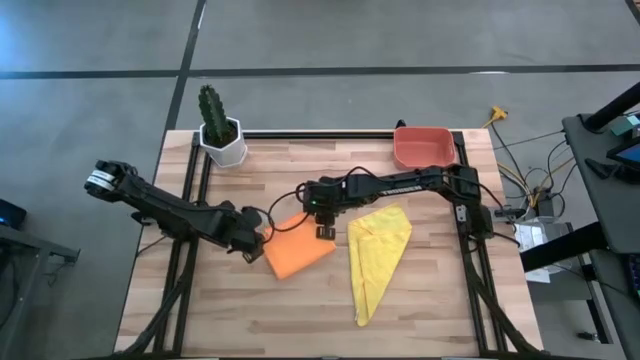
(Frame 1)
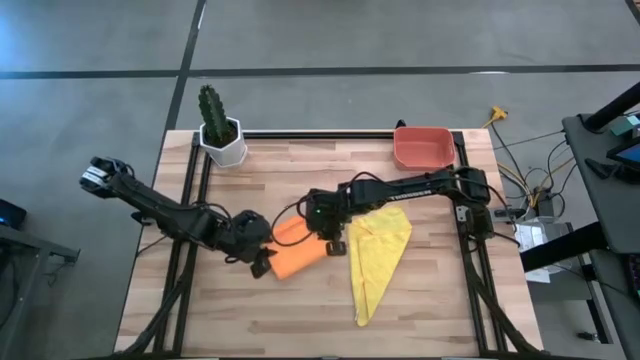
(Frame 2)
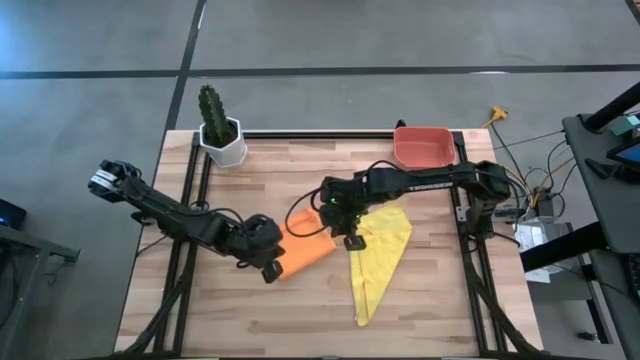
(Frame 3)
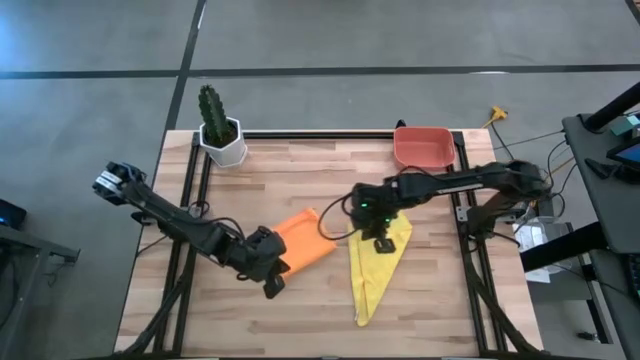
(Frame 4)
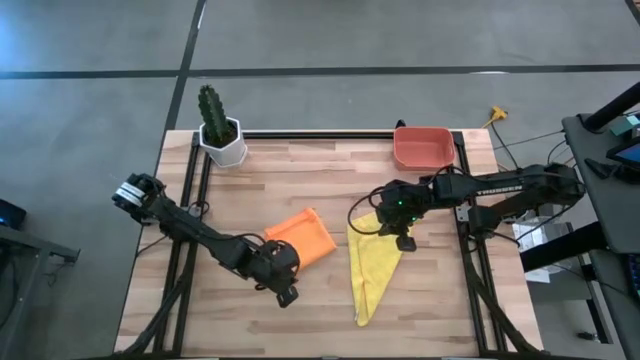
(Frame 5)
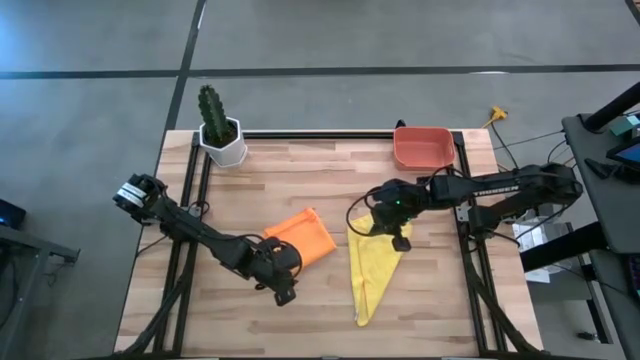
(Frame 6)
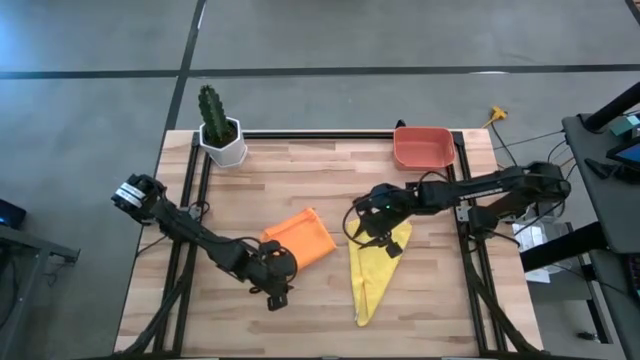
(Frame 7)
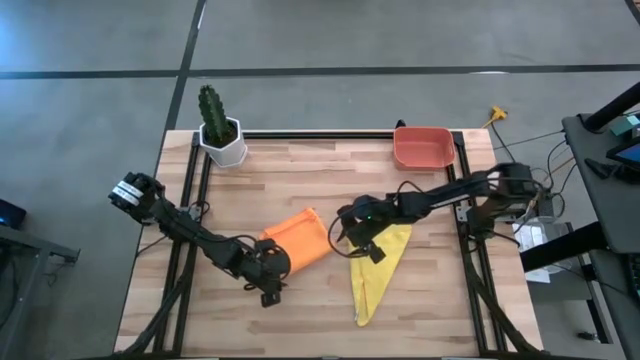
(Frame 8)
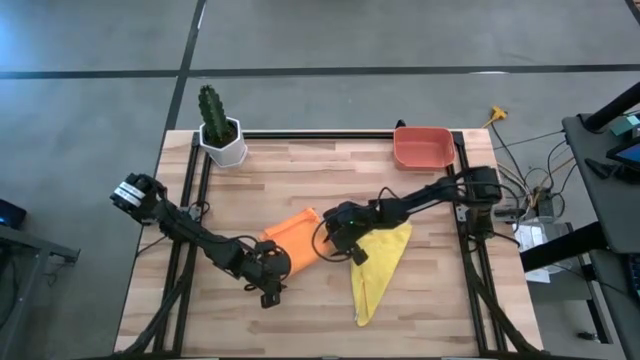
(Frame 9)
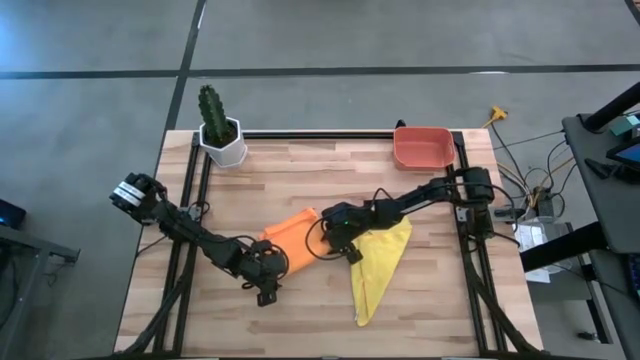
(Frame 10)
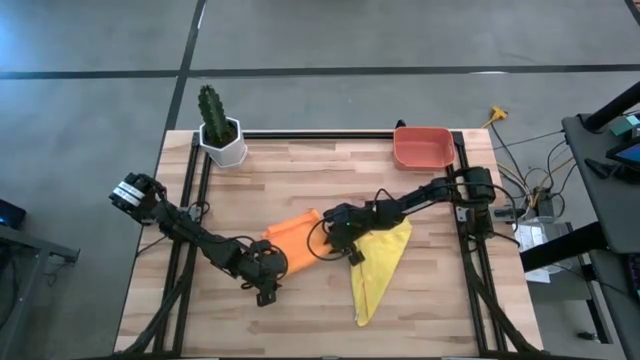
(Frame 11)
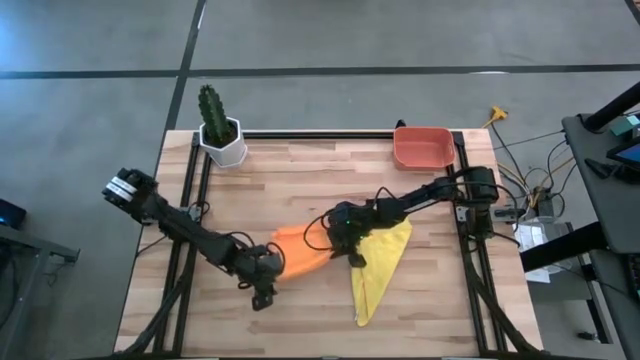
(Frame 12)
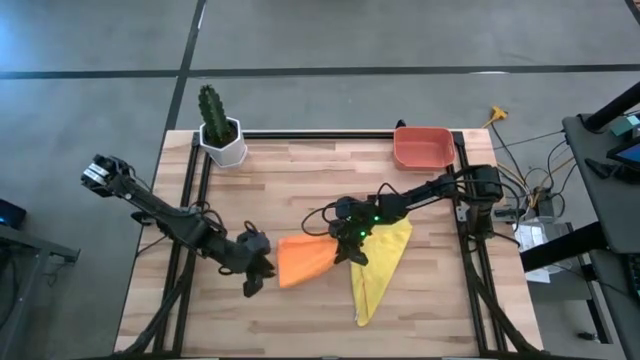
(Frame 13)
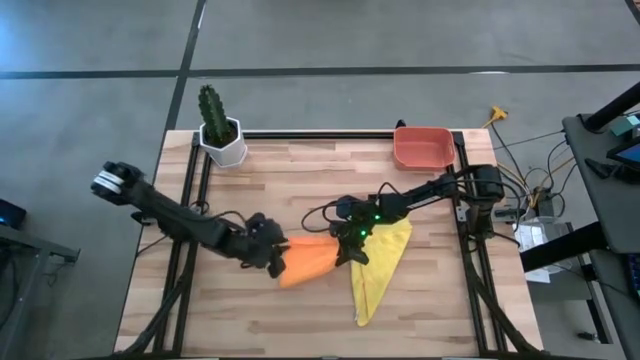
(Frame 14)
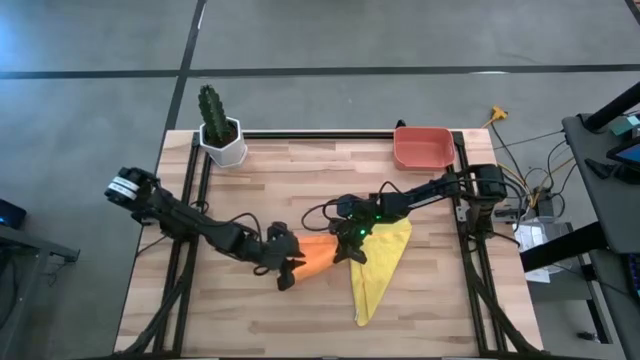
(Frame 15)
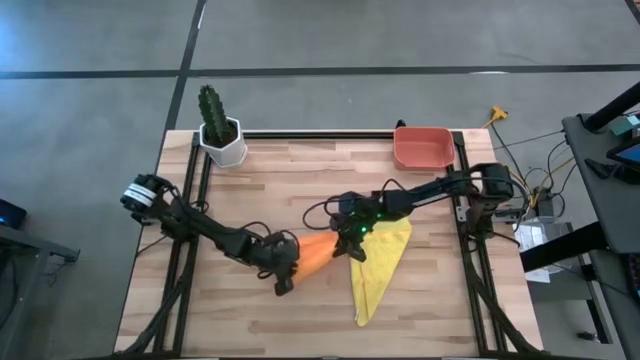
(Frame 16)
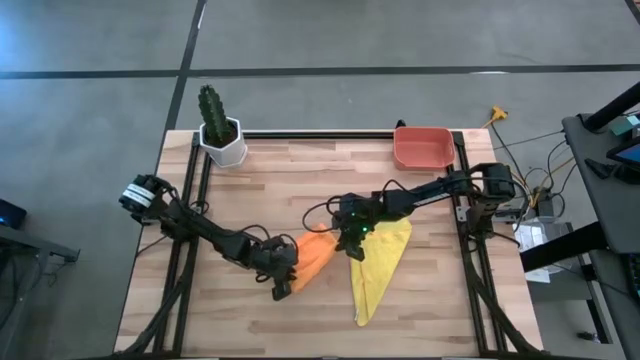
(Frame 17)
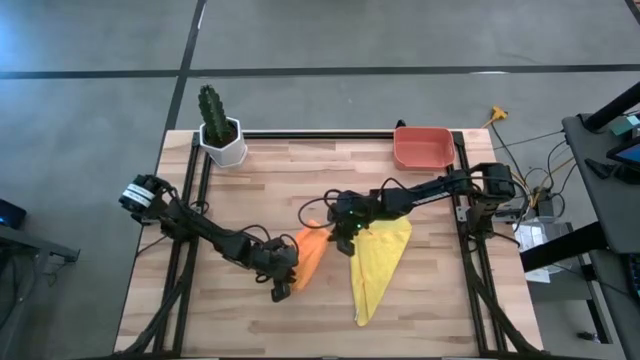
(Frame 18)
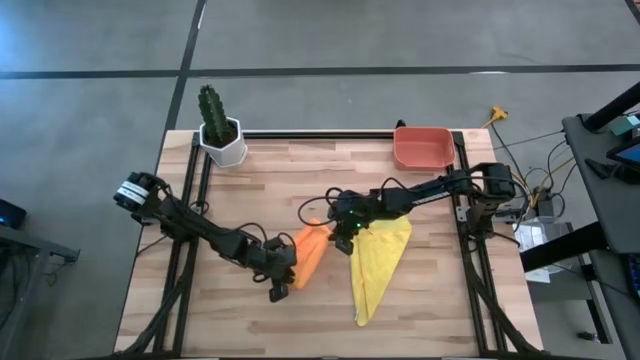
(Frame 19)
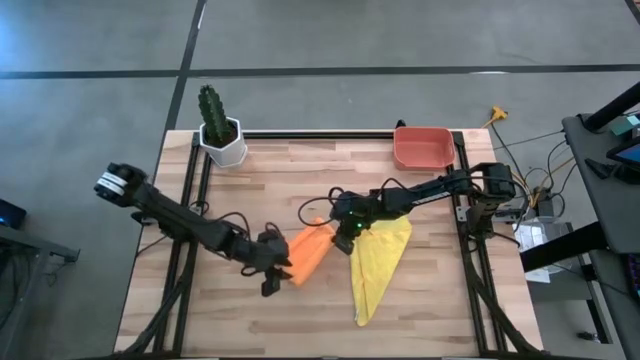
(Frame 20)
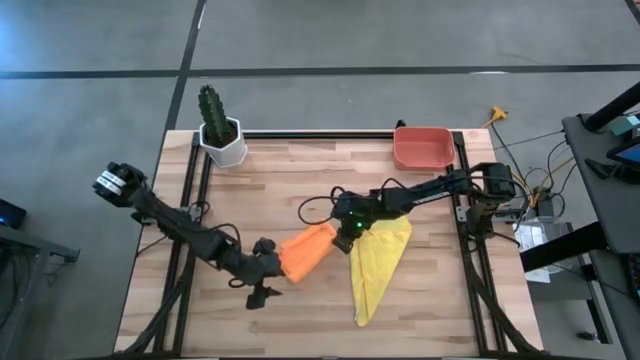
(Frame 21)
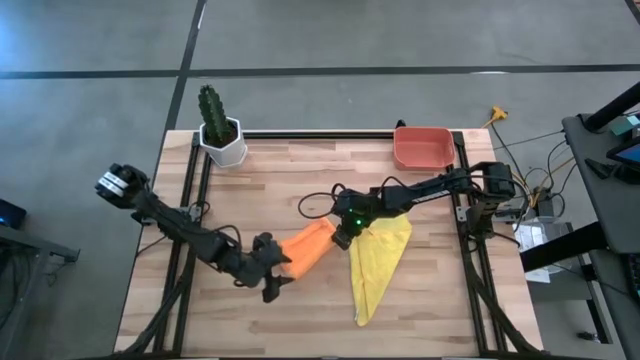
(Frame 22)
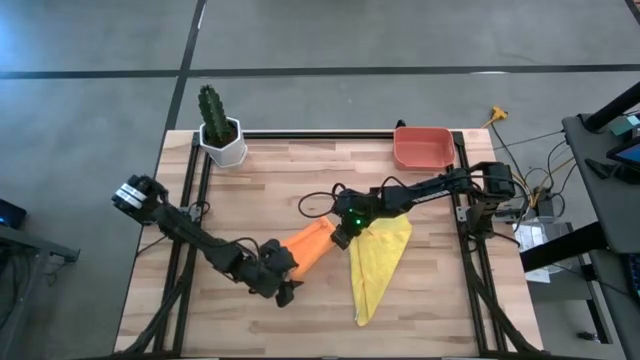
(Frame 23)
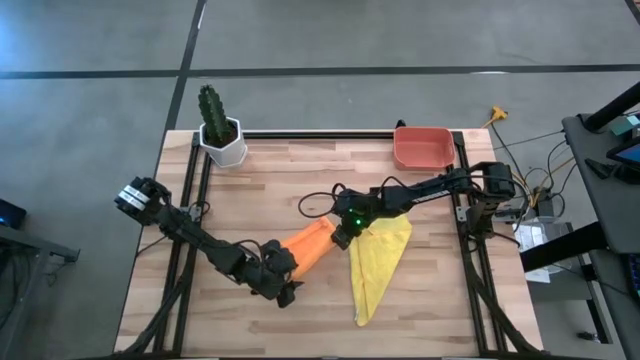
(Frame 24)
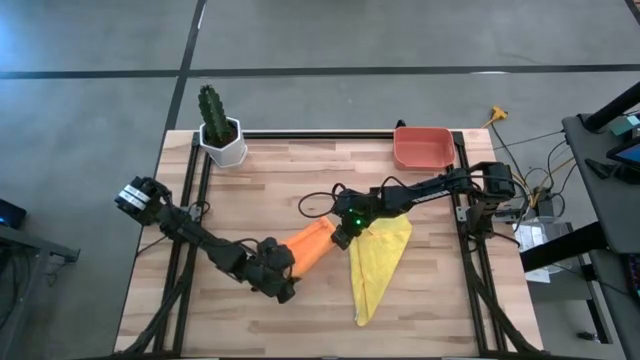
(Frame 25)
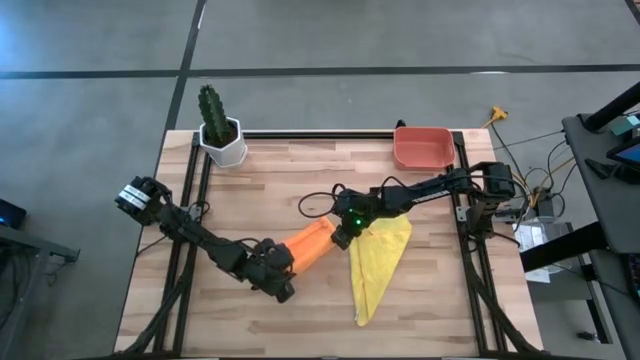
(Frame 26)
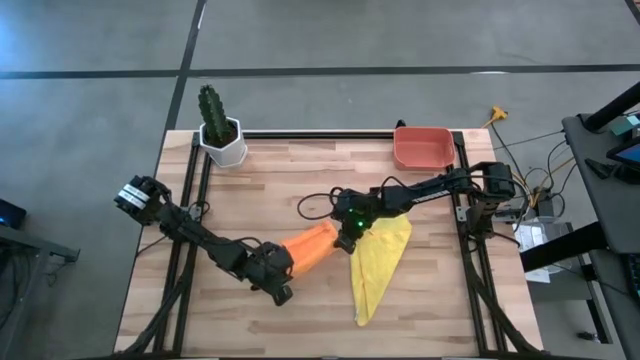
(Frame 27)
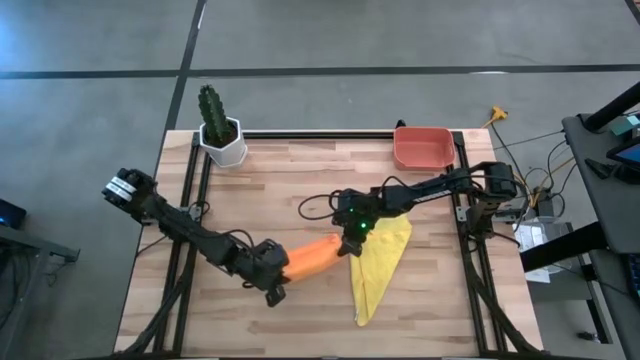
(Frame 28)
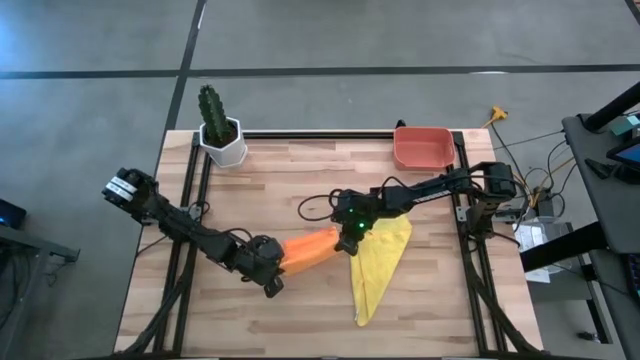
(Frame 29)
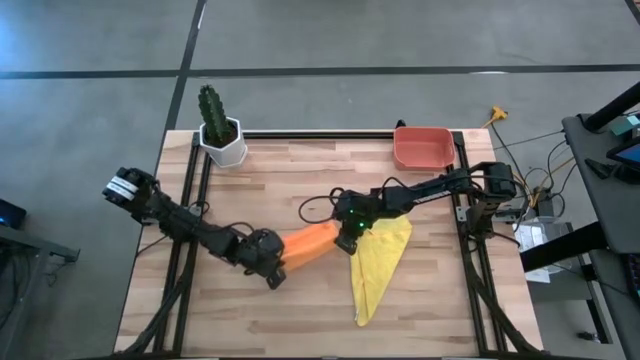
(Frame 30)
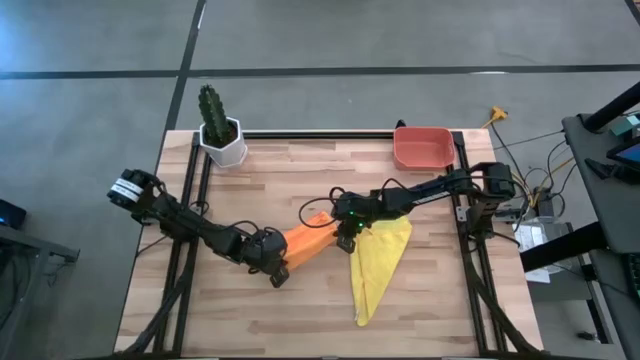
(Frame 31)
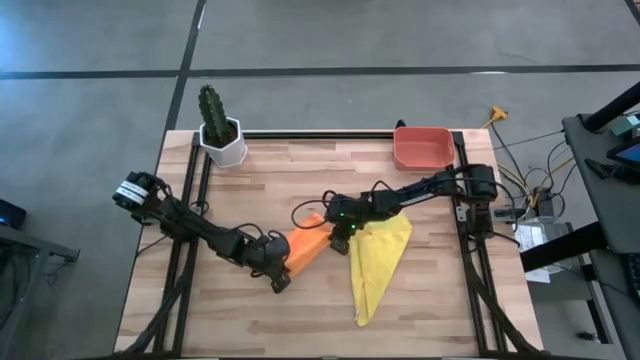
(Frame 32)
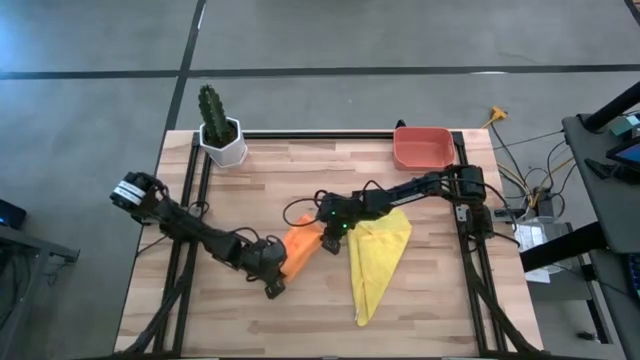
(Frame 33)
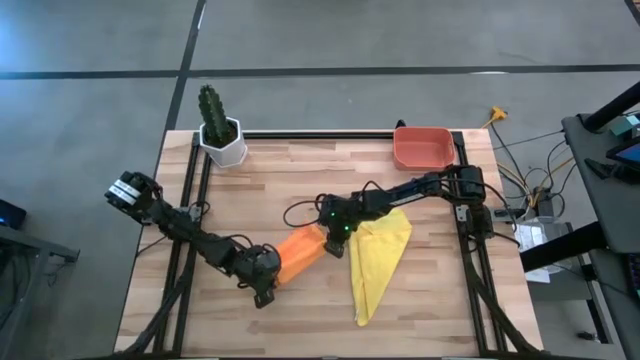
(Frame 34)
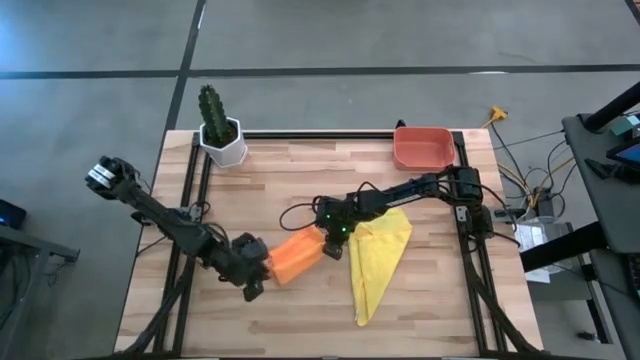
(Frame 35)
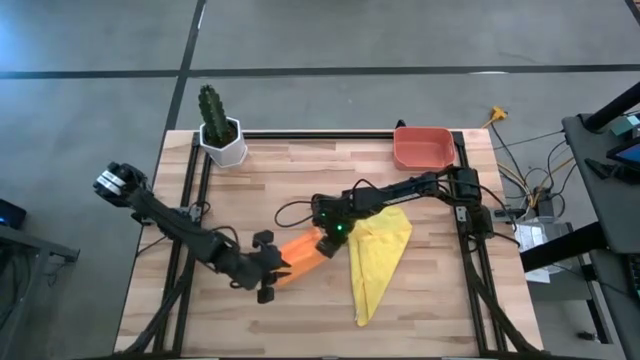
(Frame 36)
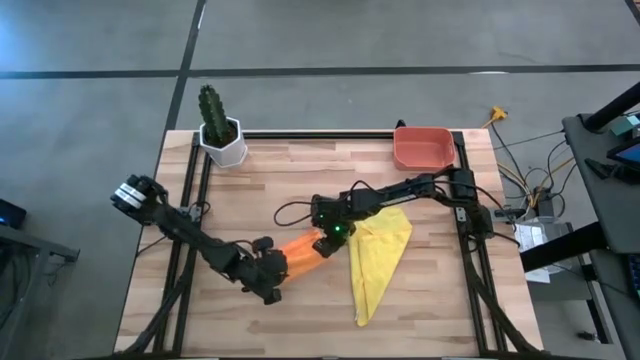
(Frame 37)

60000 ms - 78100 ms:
Task: Roll microfiber towels into tight, uniform cylinder then place into a basket
Roll the orange towel
